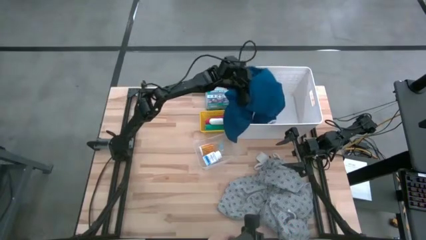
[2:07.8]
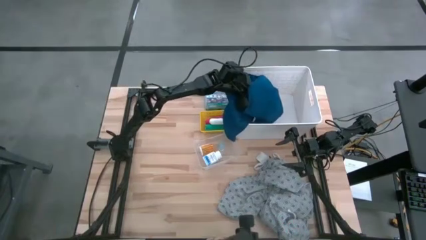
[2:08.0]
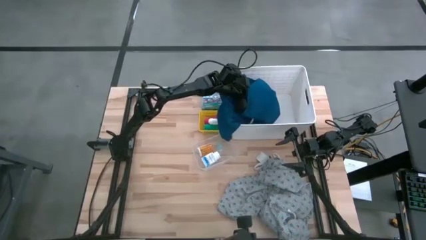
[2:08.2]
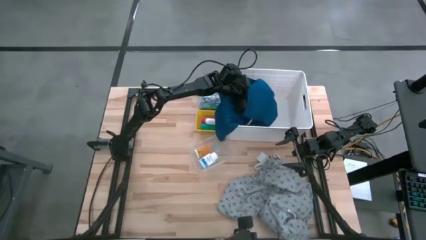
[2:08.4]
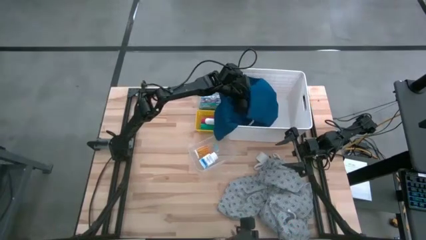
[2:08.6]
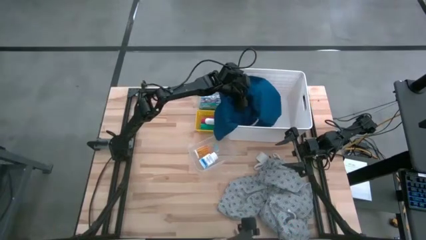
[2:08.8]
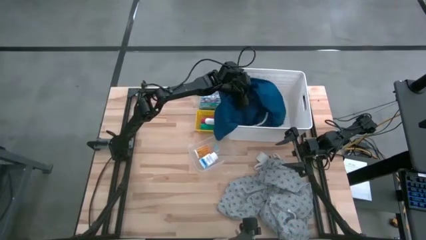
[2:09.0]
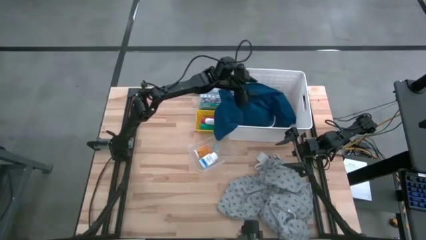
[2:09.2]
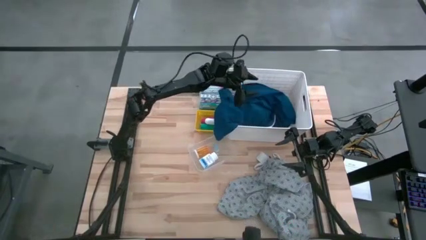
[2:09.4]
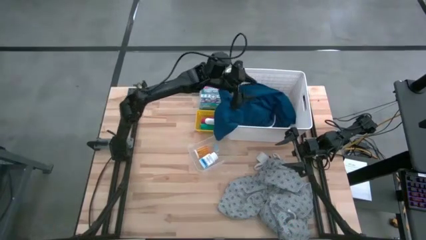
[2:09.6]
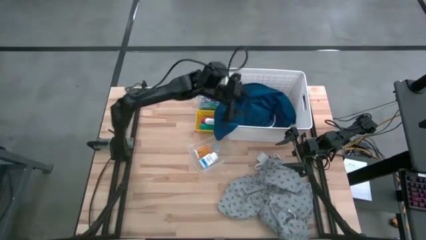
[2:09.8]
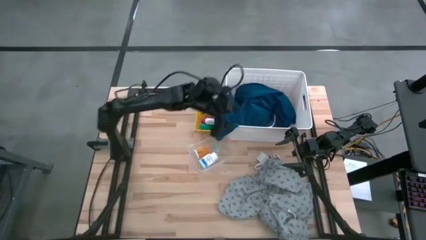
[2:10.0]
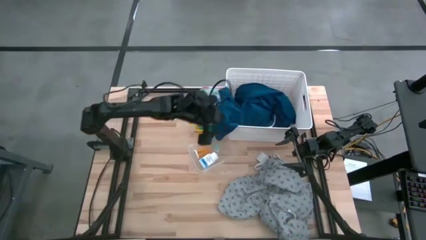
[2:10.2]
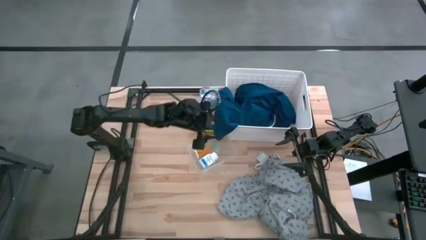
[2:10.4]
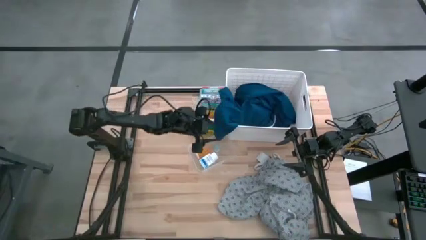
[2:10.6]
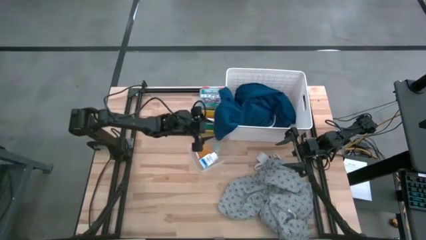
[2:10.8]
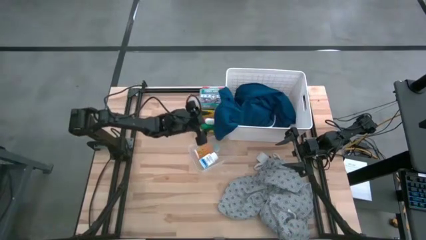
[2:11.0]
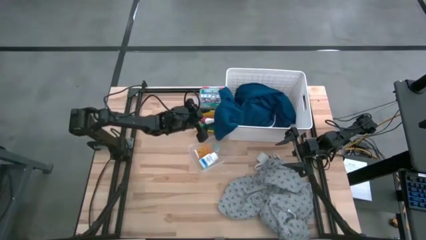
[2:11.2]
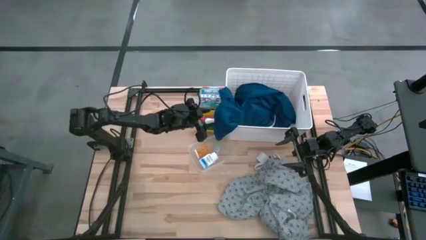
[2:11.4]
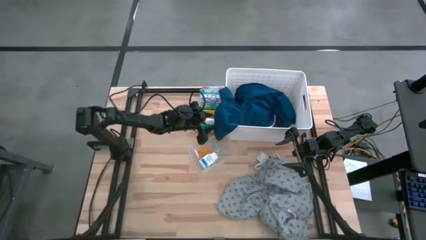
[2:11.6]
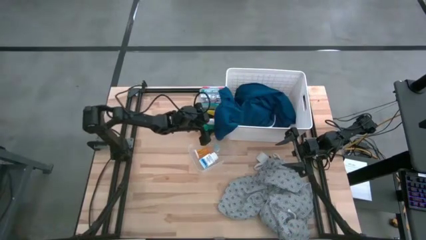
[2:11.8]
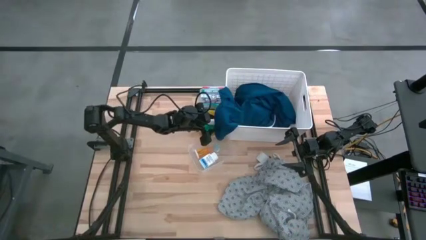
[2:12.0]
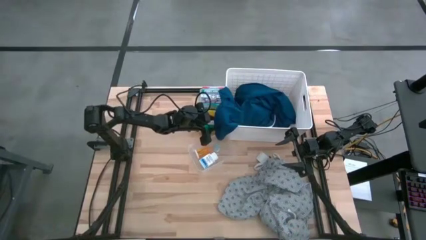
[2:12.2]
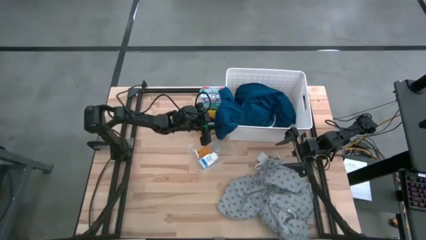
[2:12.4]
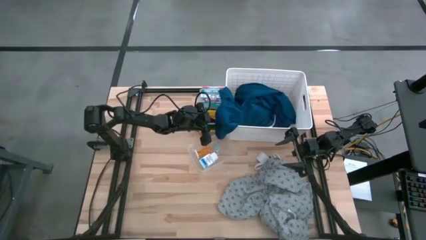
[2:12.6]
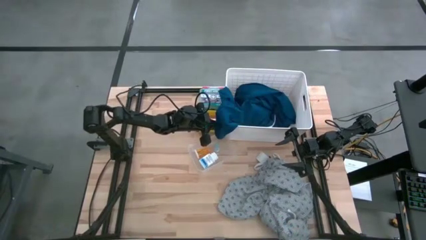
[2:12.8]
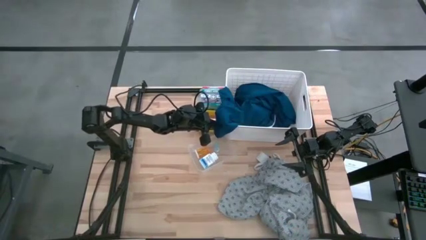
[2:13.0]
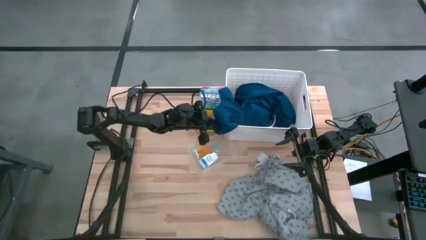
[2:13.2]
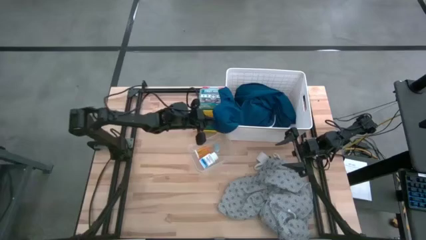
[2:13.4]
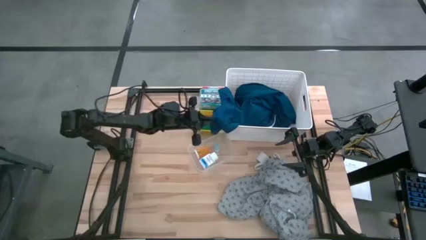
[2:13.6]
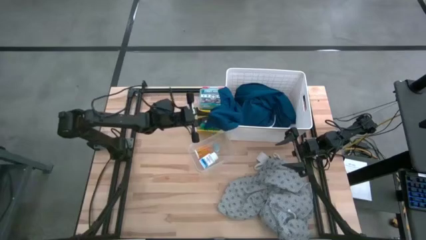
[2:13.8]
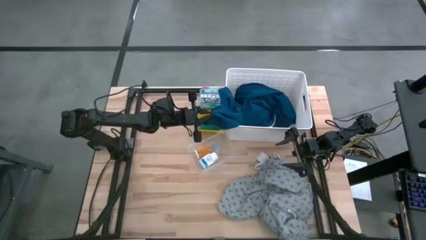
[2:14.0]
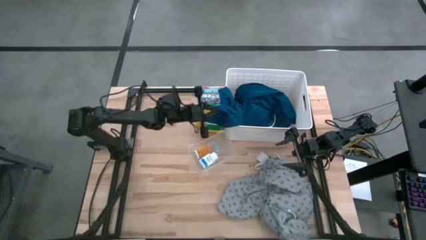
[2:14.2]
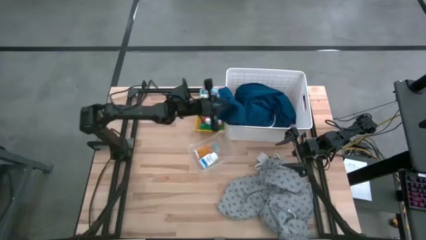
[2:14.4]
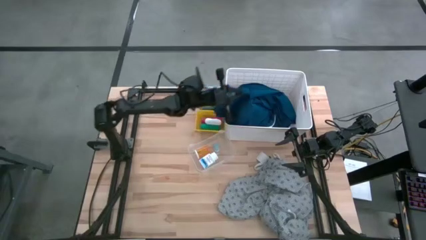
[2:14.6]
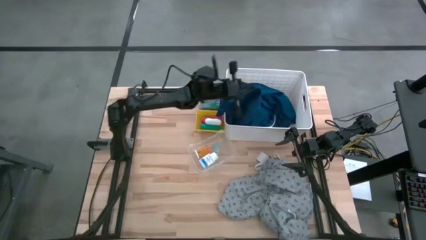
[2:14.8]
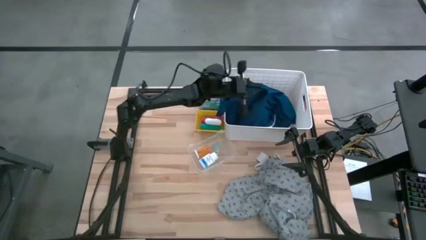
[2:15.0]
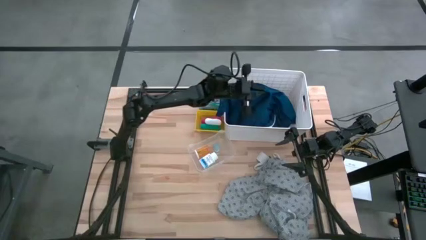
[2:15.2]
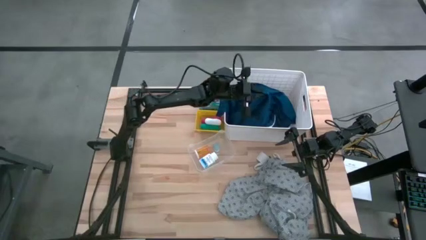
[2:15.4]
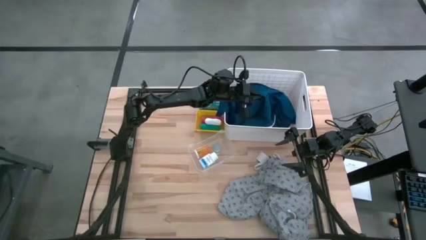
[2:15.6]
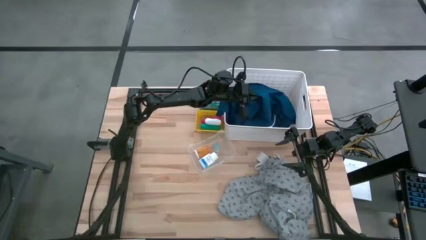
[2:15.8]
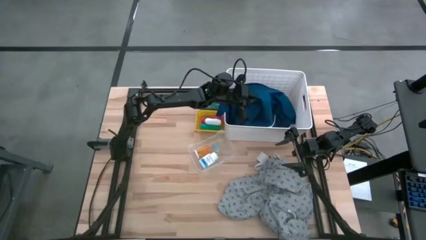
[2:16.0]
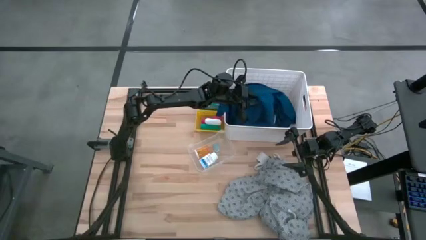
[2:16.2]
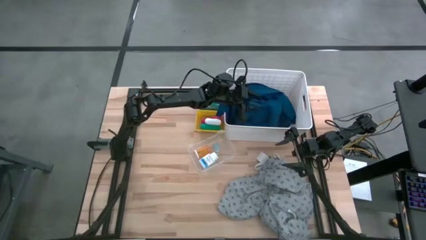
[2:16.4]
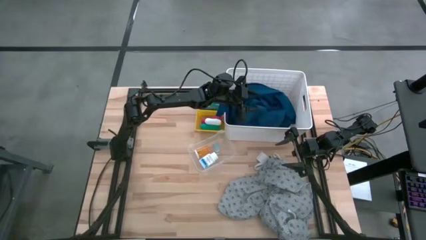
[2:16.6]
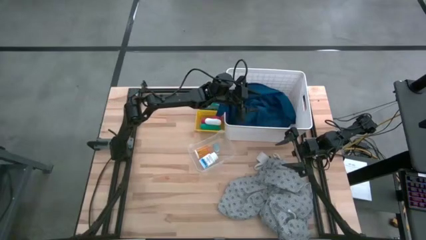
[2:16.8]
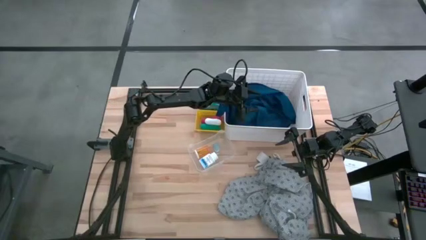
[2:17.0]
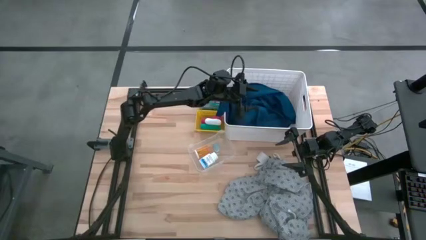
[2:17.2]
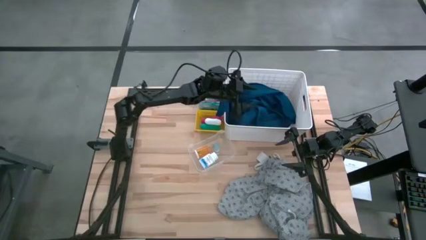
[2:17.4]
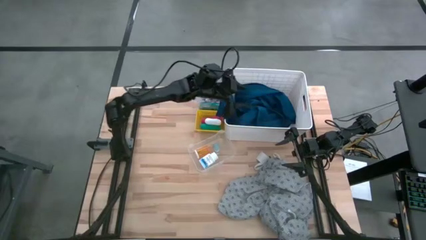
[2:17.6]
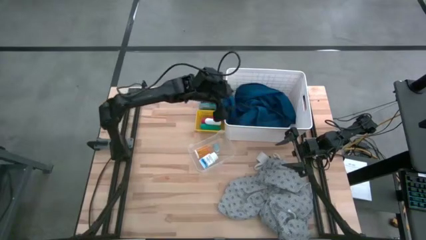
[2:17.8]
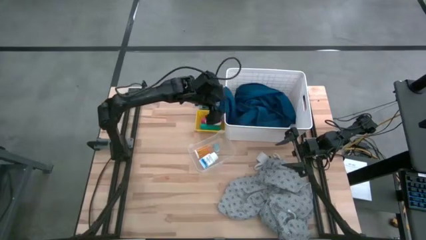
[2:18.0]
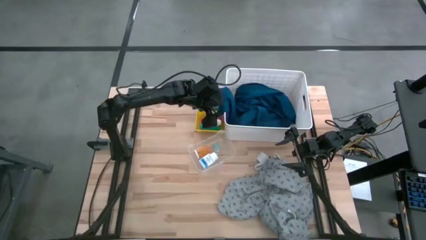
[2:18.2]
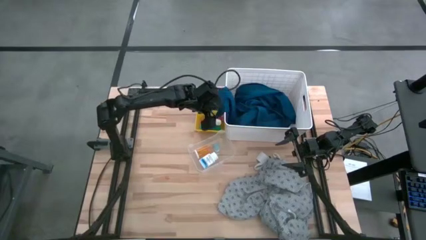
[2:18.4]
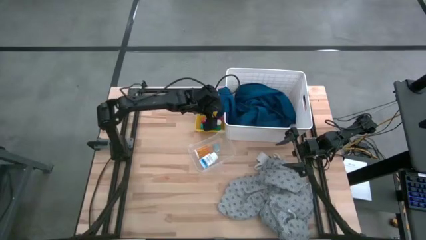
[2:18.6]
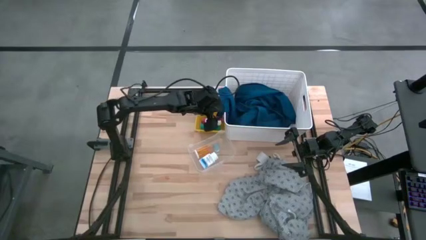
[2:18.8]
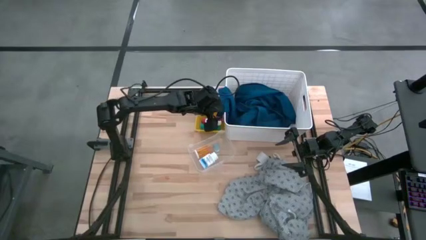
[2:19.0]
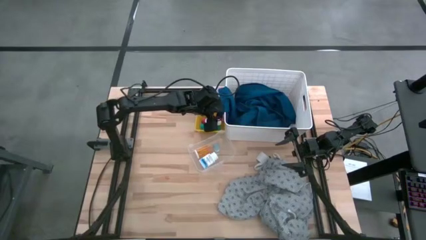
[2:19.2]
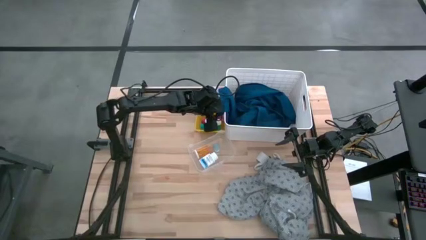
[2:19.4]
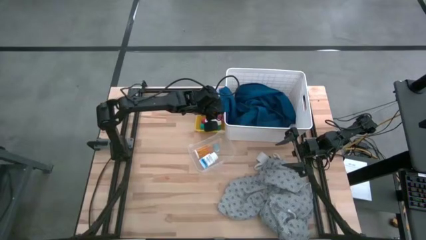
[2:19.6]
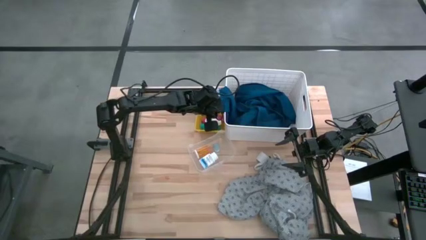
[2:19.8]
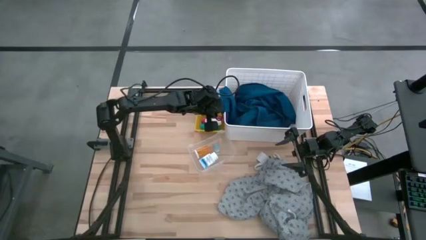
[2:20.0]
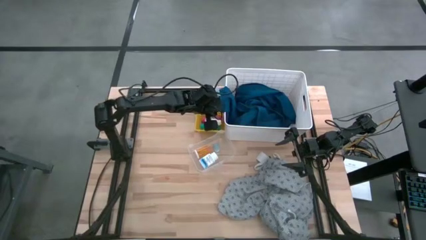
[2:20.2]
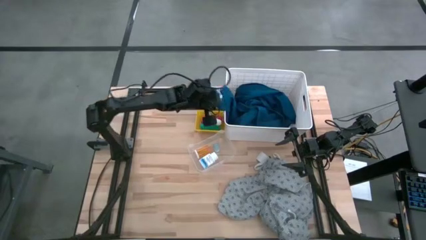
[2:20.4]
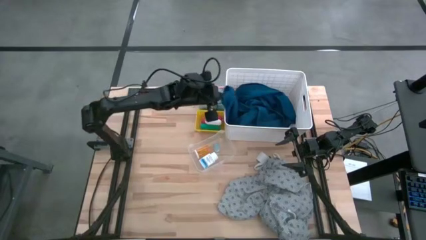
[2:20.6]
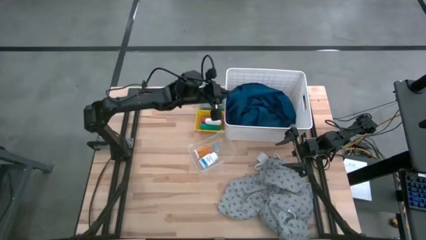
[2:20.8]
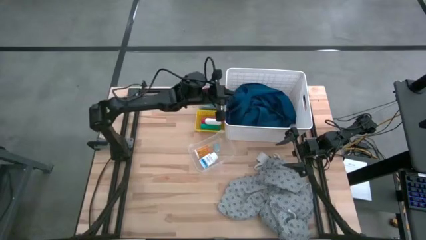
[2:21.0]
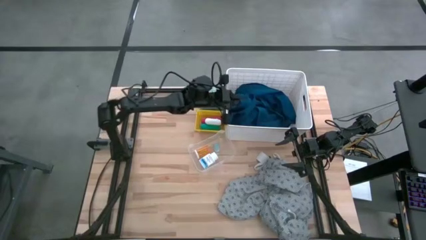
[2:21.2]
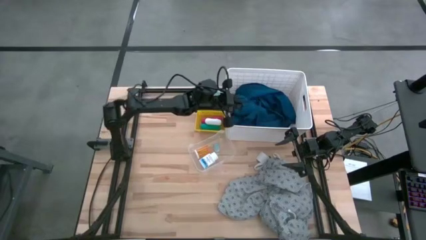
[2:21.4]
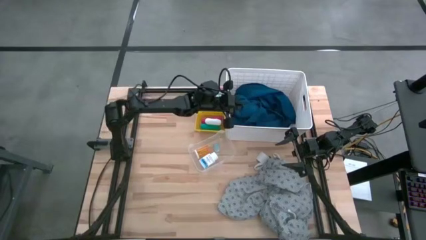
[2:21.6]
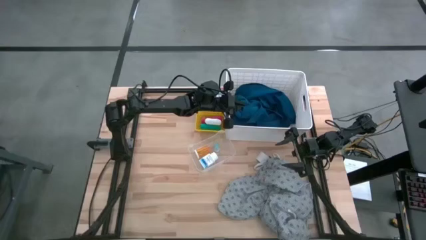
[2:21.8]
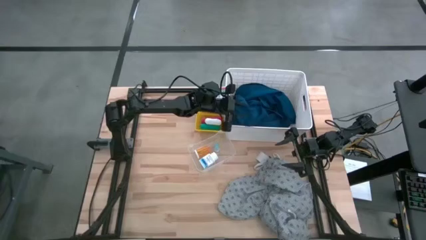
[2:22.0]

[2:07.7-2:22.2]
Task: Pick & Place Medicine items
Put the blue patient gown into the white bin
